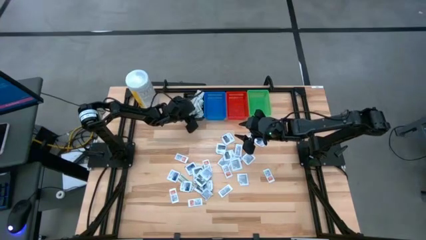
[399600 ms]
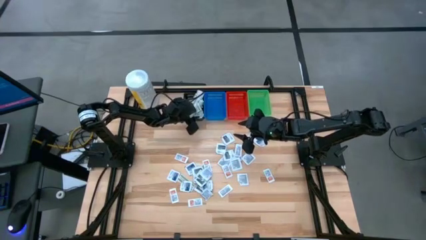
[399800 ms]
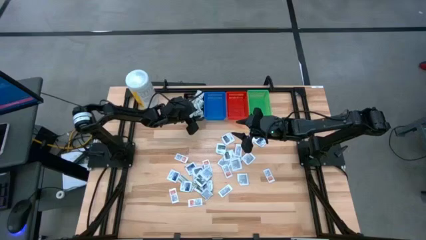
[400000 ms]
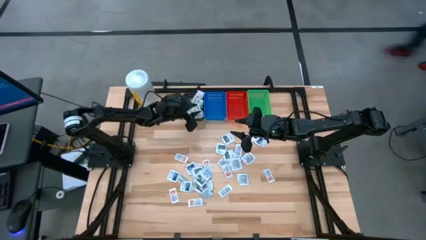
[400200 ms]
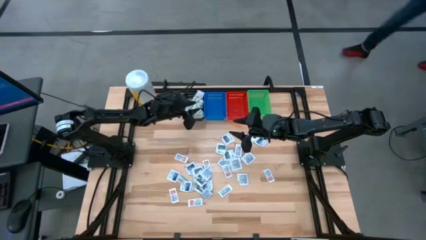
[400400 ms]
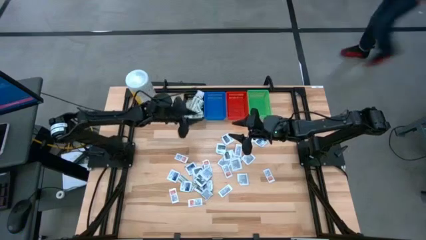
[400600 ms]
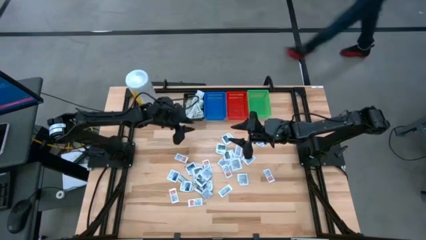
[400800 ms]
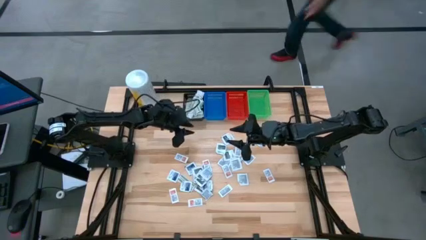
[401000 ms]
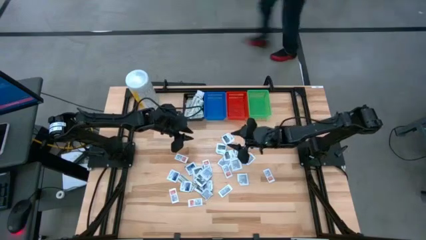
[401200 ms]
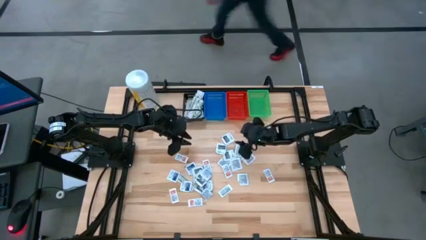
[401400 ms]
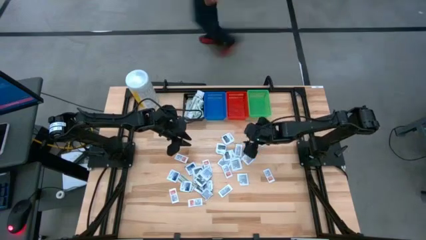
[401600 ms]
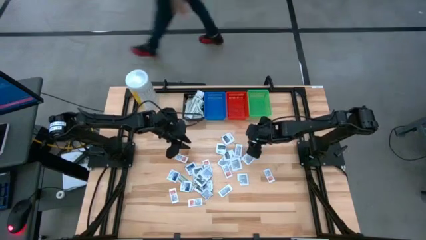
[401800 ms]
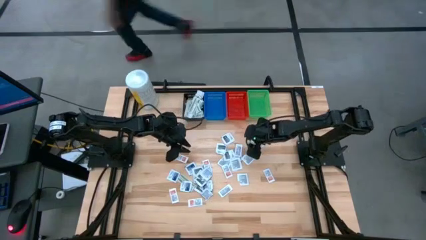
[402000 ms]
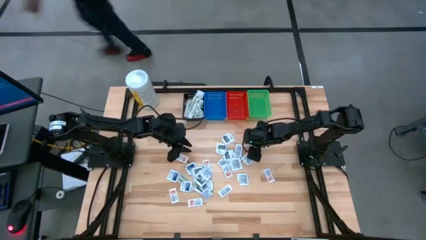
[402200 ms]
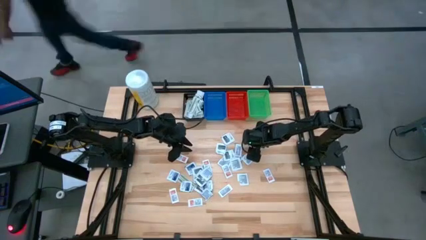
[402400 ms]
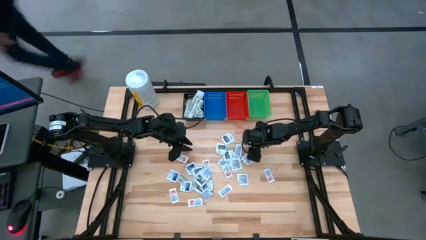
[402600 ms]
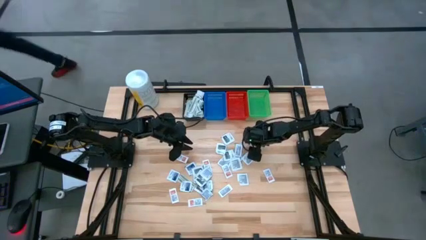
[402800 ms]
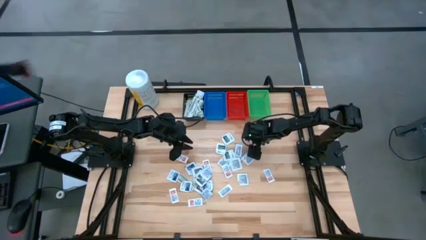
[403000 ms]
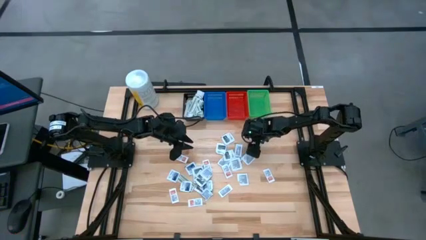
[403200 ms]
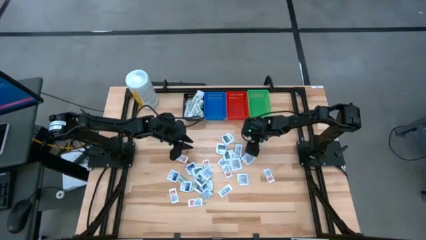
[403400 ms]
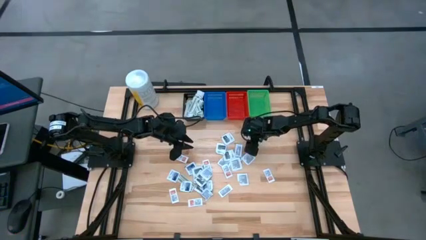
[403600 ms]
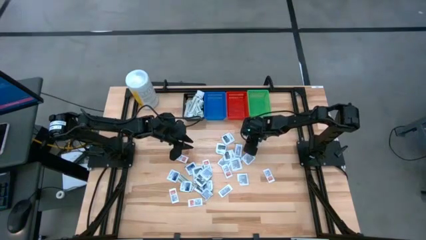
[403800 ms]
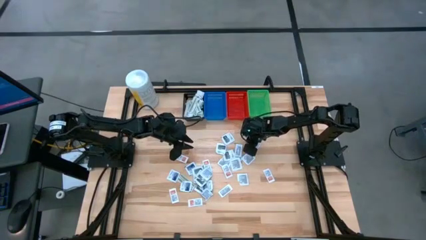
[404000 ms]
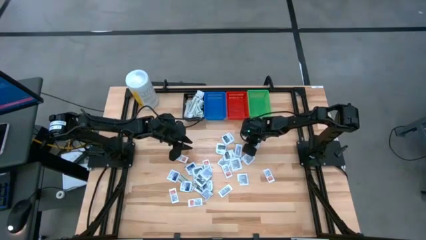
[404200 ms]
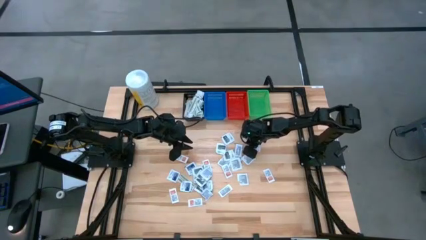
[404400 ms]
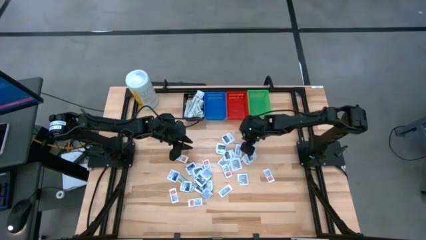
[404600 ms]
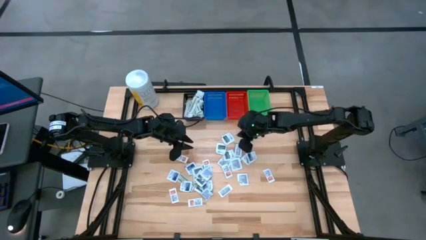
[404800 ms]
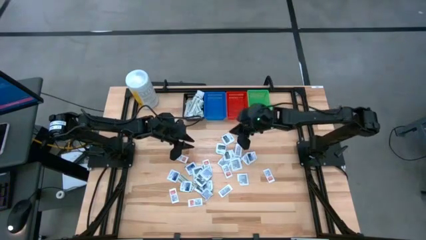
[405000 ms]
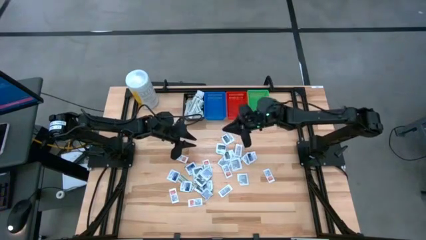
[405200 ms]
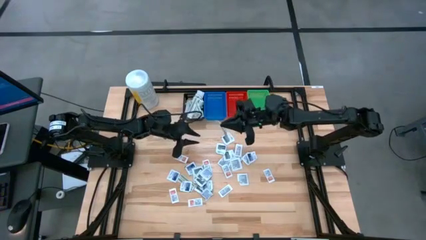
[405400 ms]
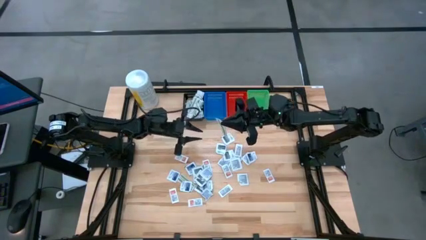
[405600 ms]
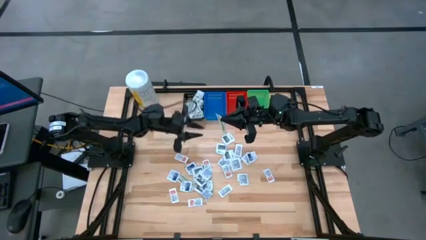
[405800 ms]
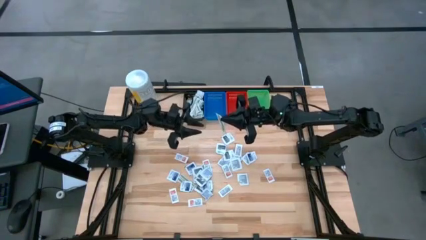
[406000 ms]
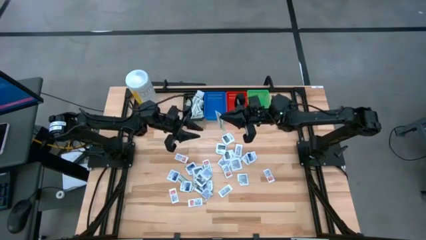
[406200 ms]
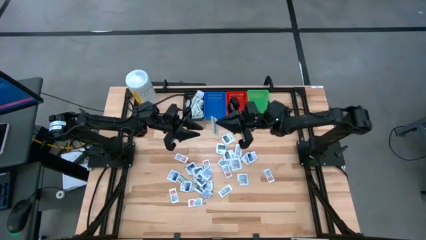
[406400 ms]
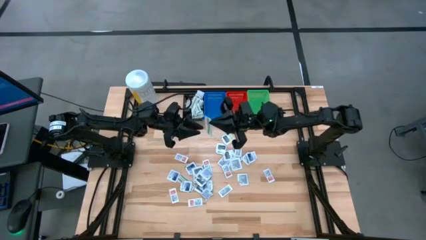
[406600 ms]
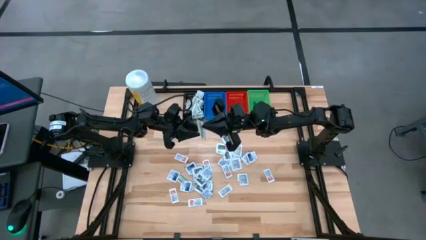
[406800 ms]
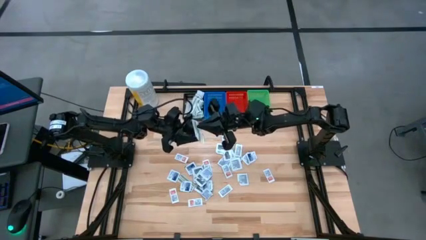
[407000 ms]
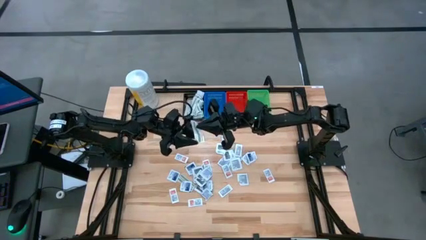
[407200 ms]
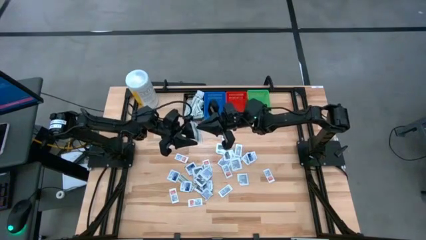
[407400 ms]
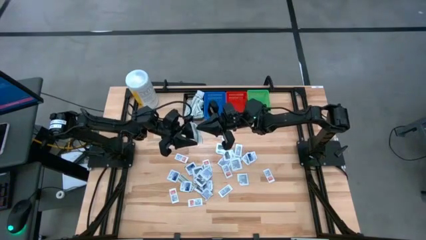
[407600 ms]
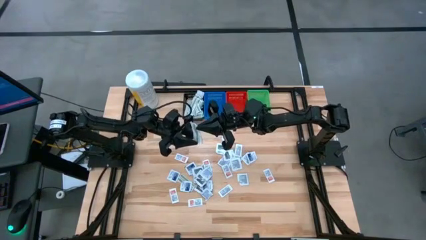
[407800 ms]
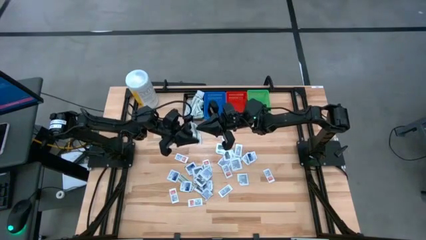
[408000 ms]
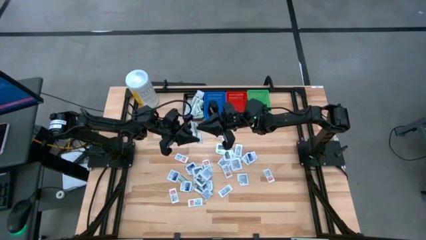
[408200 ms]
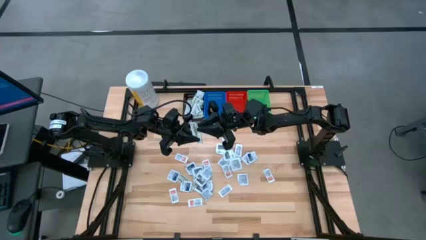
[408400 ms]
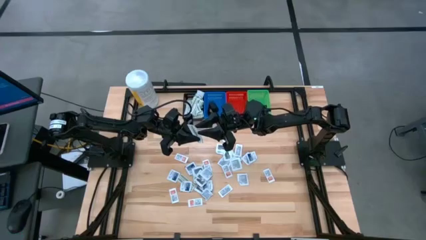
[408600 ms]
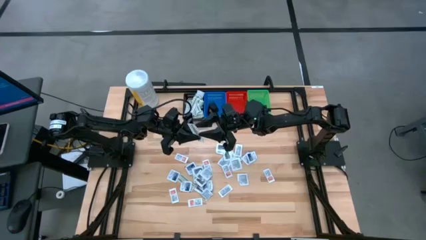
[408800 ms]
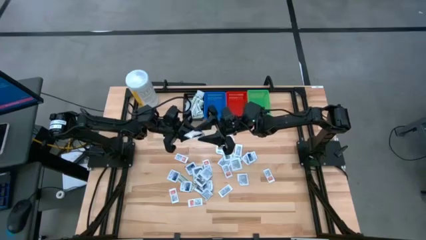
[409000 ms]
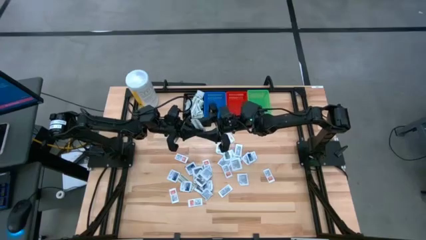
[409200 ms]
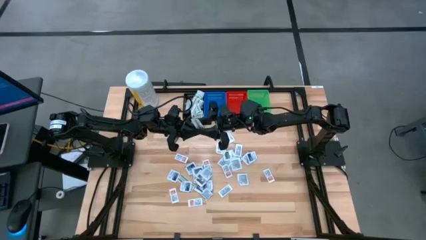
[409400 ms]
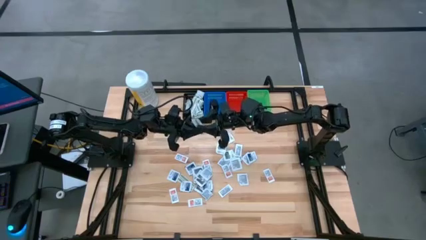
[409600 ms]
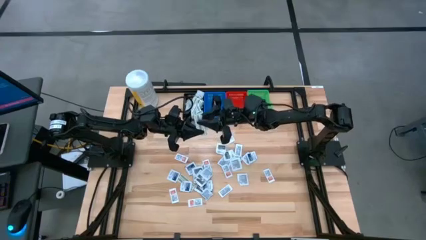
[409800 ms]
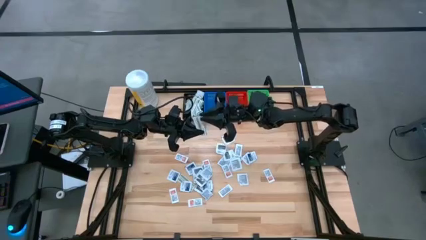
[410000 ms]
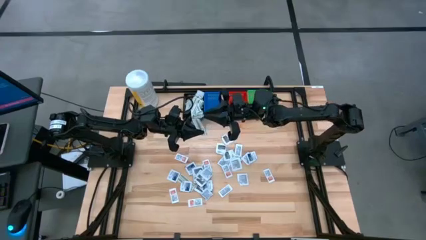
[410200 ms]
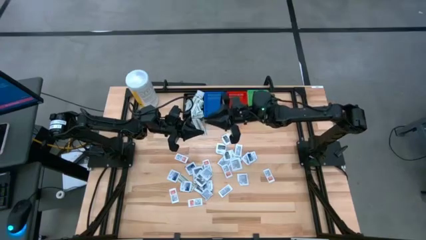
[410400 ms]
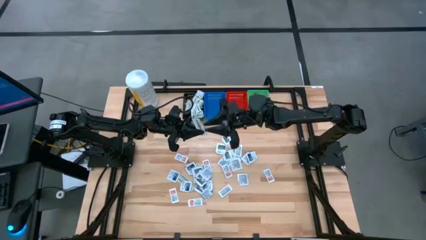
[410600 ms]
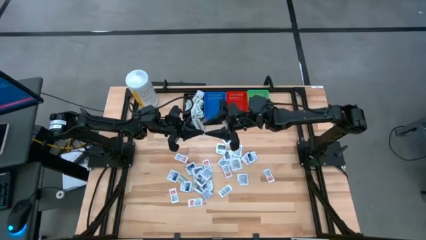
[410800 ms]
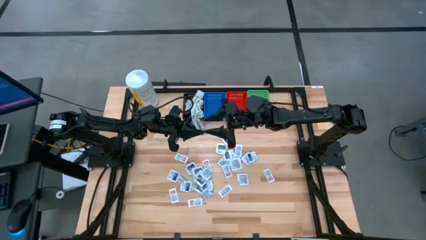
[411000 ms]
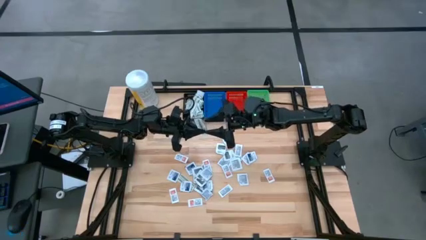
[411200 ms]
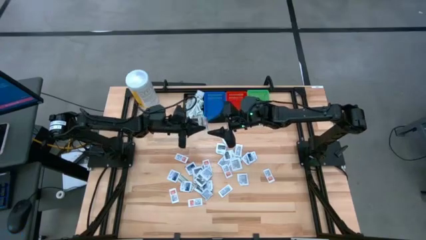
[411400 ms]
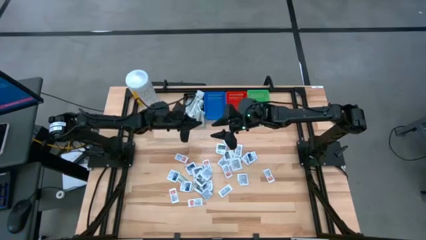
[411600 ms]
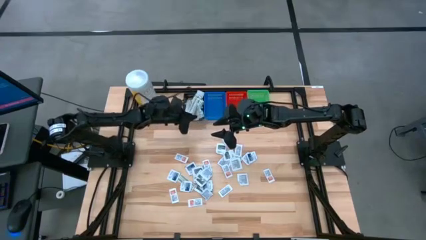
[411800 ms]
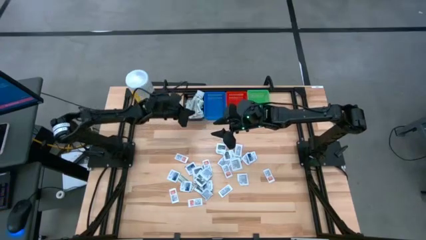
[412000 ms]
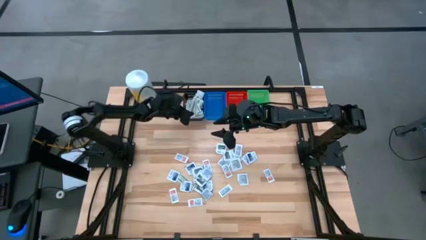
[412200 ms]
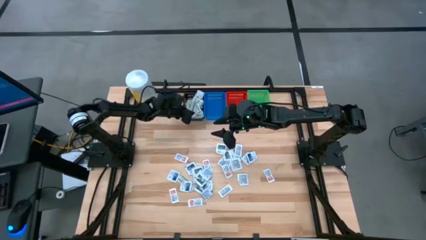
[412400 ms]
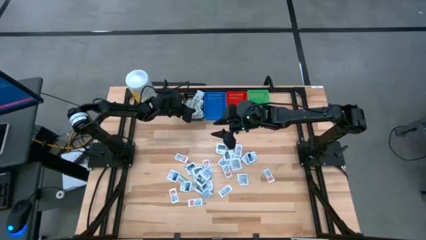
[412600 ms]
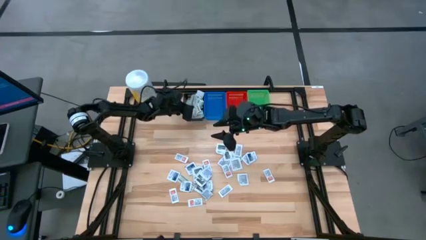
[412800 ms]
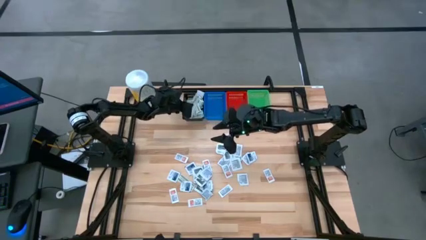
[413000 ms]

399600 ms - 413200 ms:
Task: Pick & Place First Aid Supplies
Put the green bandage pack in the black bin
